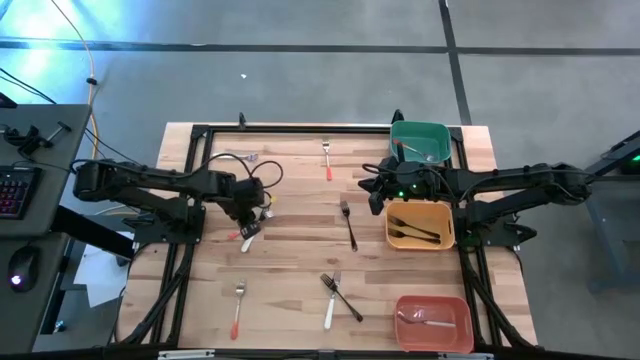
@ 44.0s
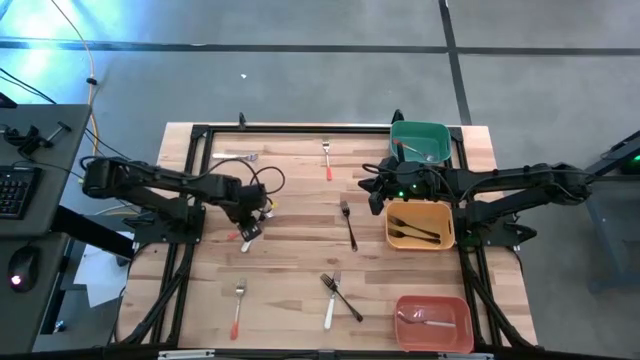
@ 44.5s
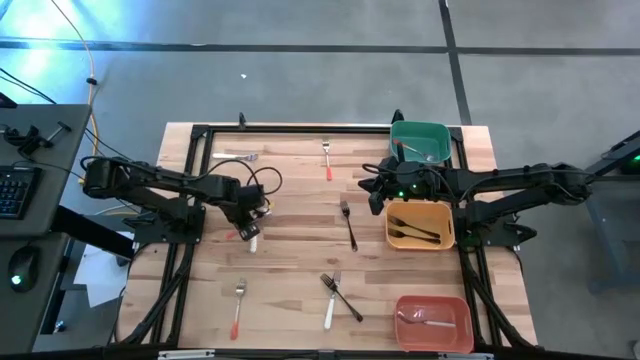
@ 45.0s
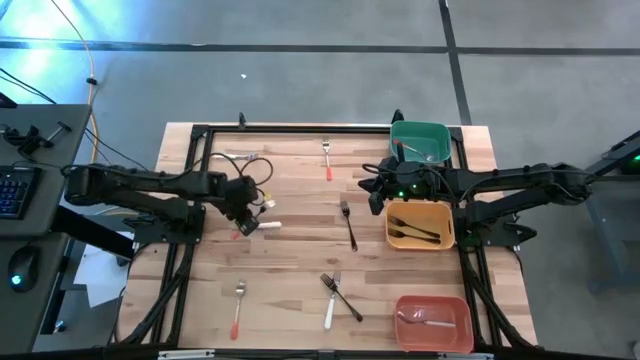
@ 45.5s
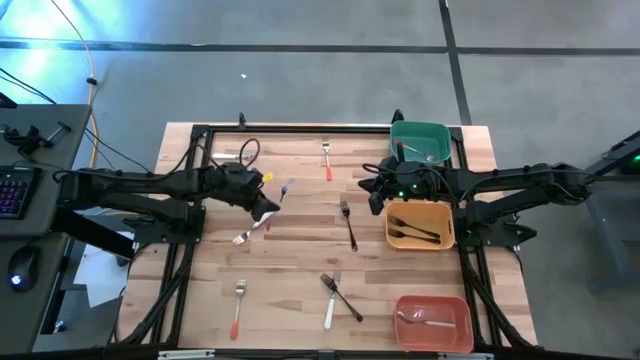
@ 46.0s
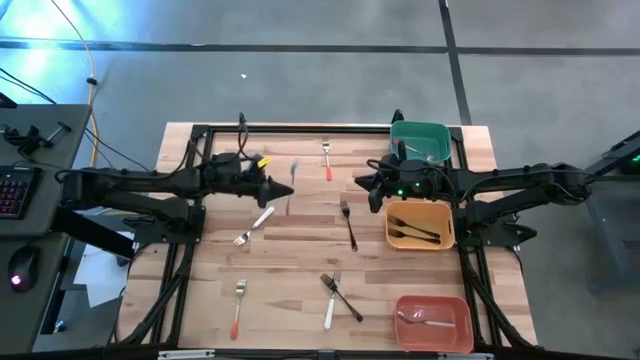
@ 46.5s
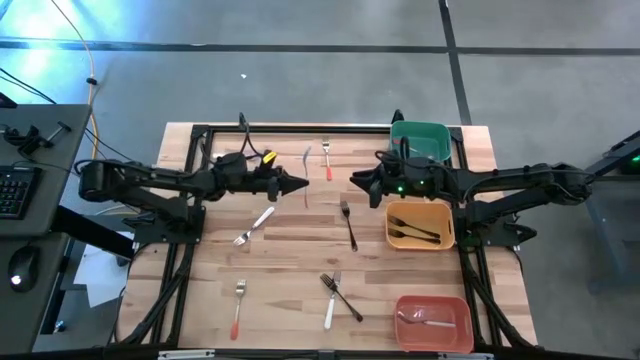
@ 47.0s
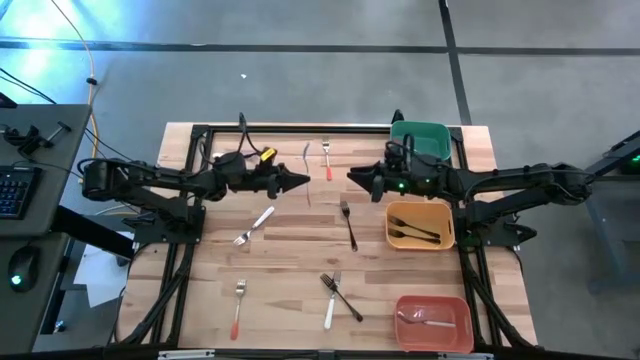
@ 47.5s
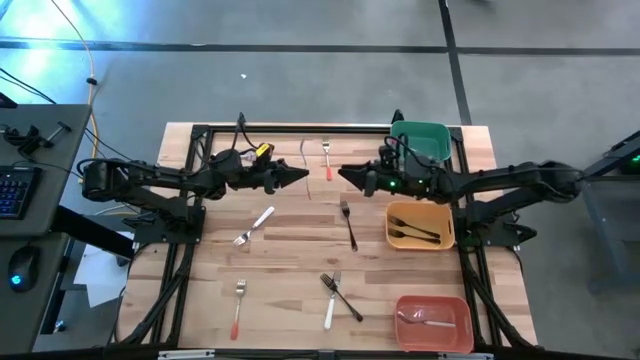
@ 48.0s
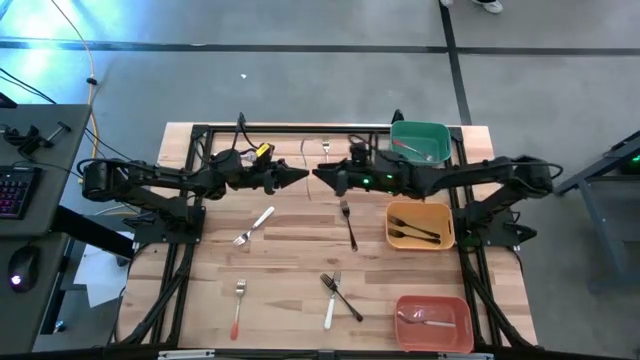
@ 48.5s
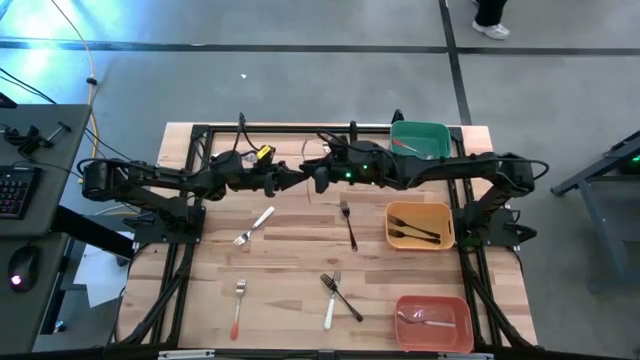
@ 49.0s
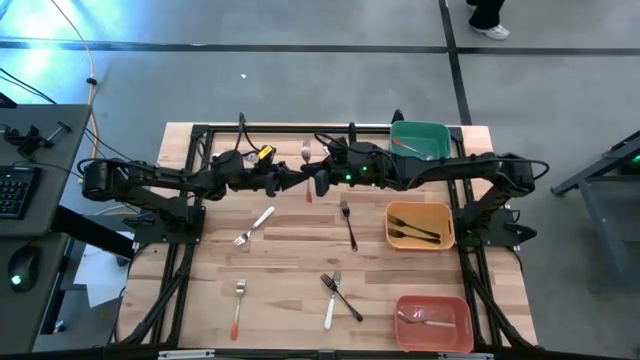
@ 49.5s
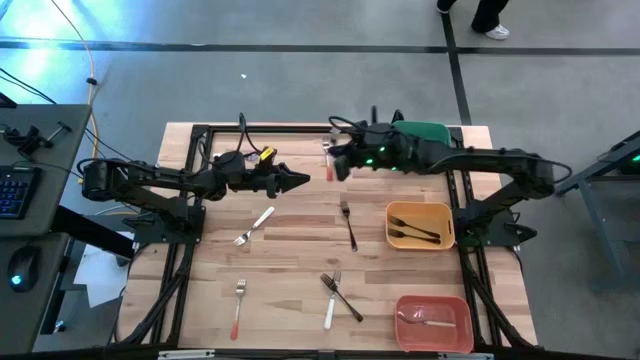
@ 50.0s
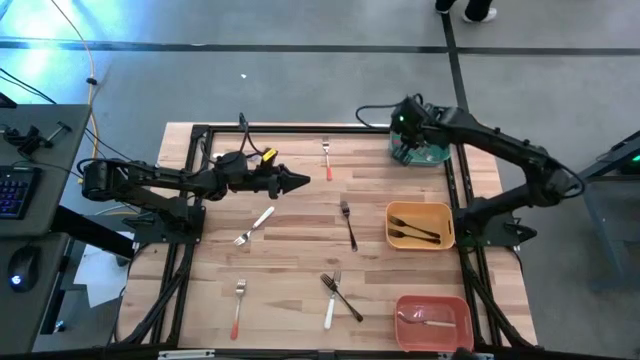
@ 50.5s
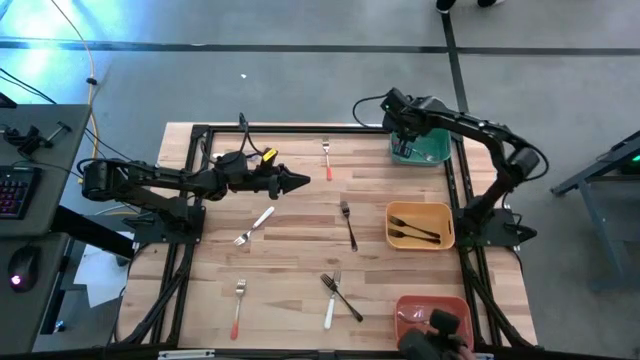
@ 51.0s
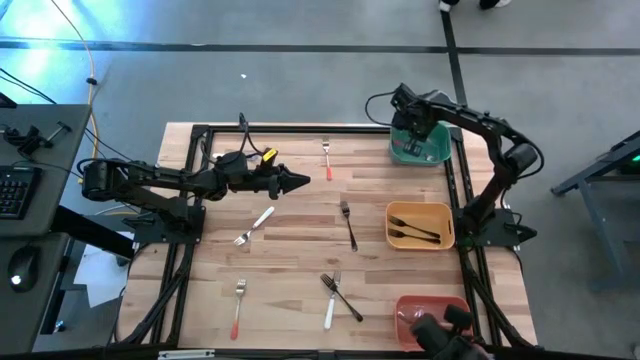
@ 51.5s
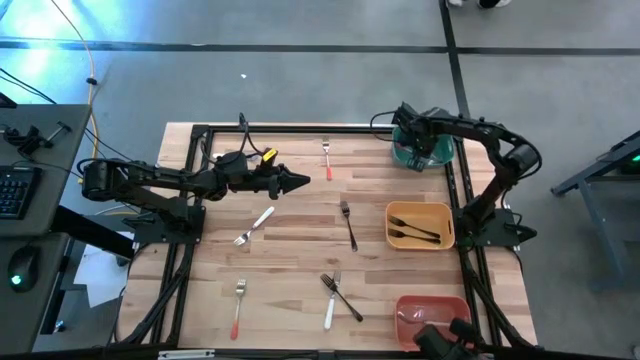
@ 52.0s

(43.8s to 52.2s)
Task: Sort silverware by color (type)
Put the orange fork into the green bin

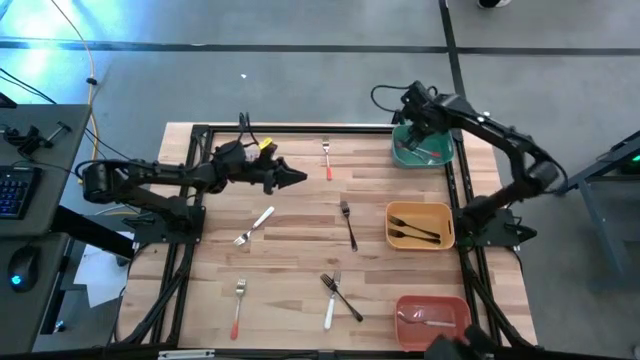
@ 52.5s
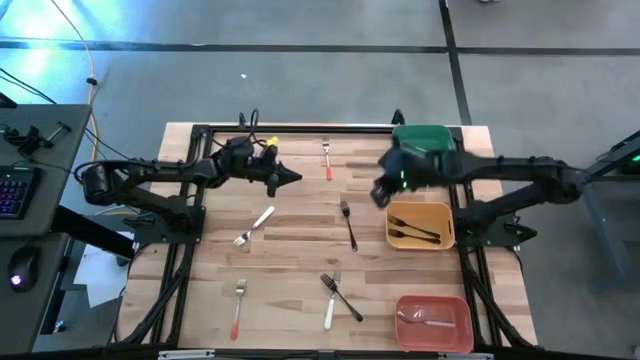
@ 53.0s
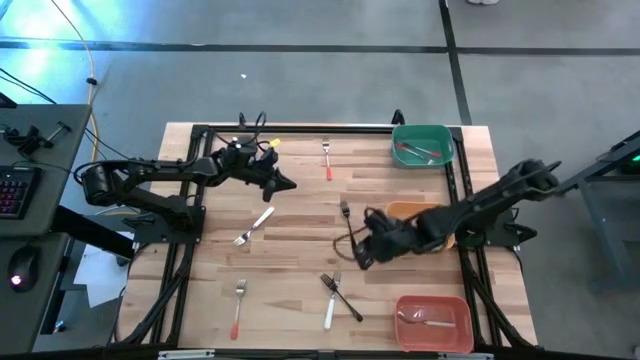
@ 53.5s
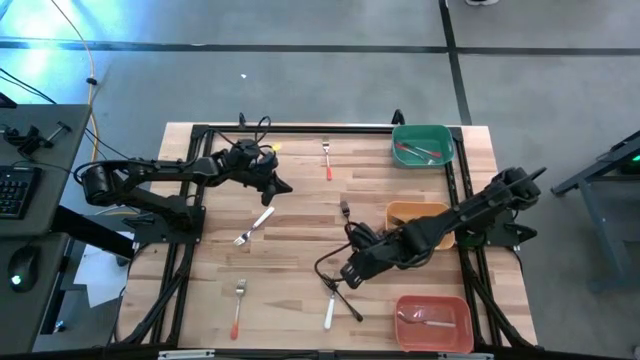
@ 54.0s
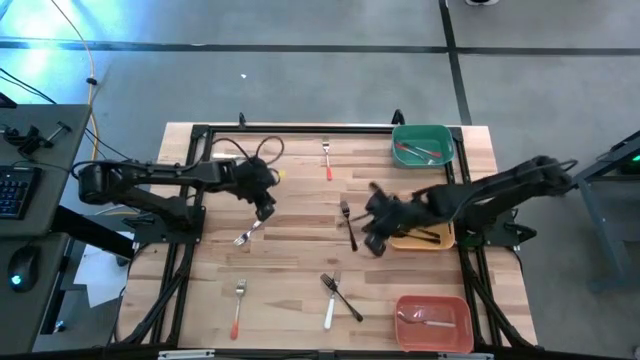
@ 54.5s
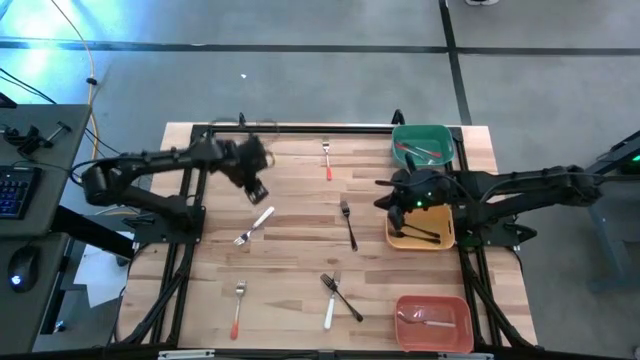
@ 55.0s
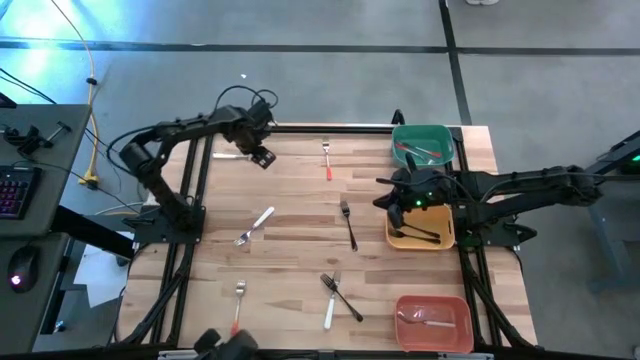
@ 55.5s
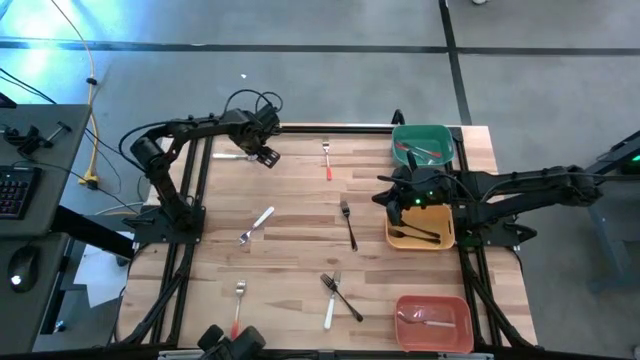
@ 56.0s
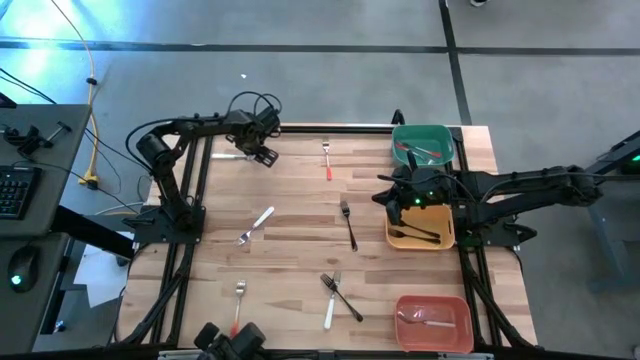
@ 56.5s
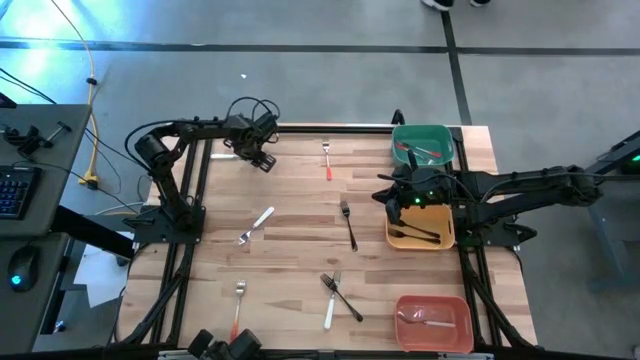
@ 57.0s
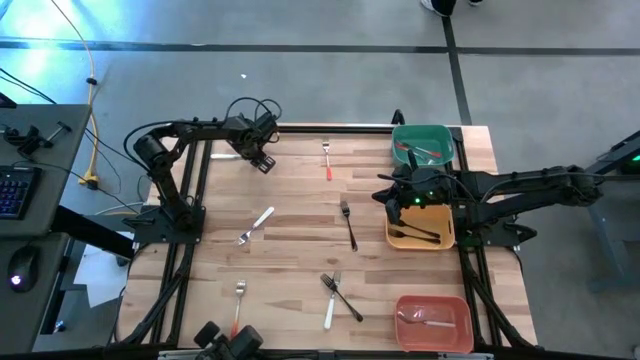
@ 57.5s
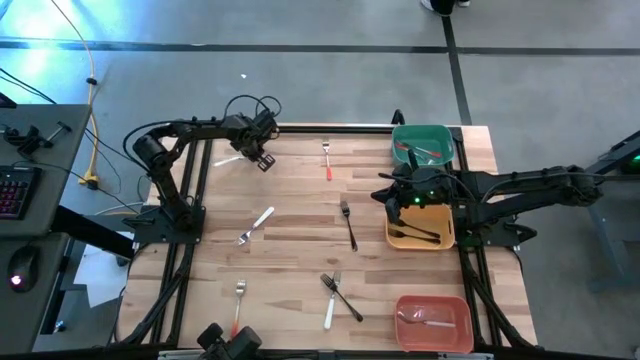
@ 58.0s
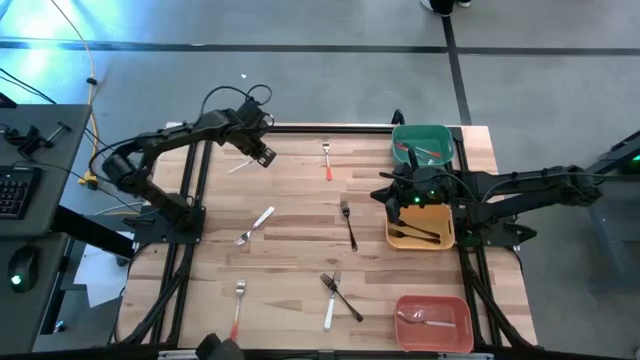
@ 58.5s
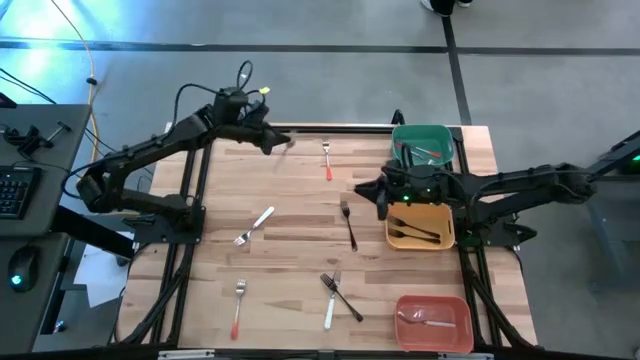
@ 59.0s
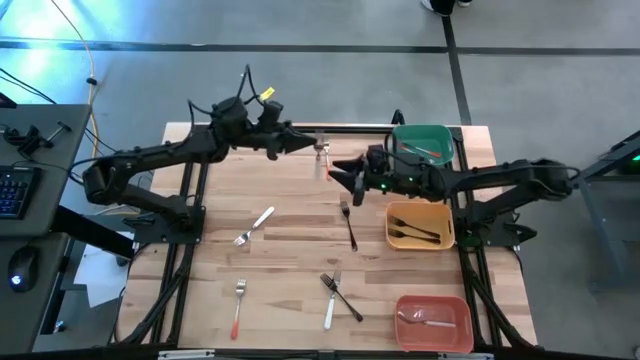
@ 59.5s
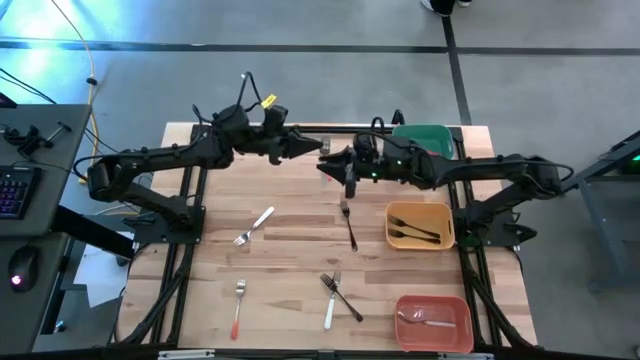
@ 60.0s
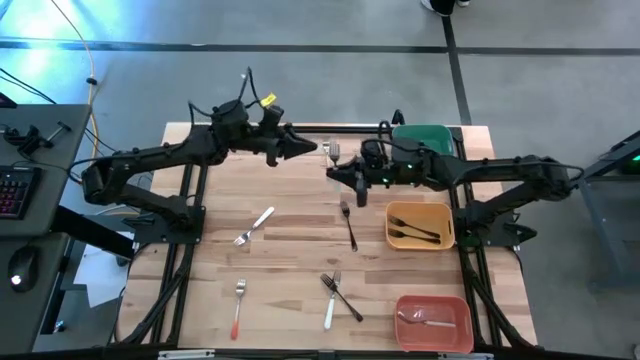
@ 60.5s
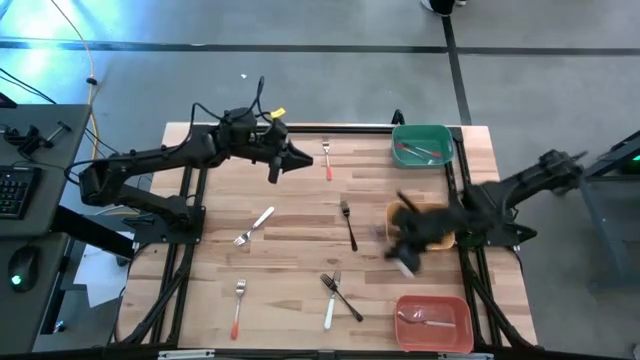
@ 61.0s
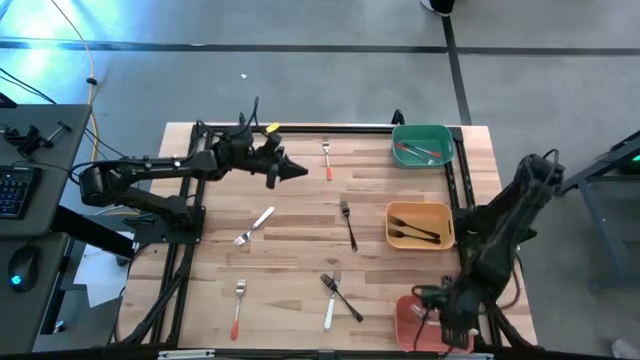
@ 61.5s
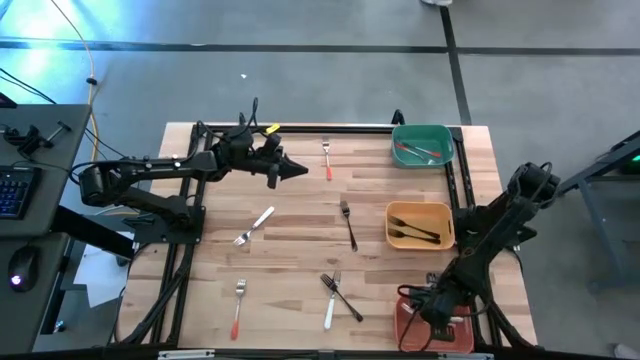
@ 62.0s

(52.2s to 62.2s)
Put the white fork into the orange bin

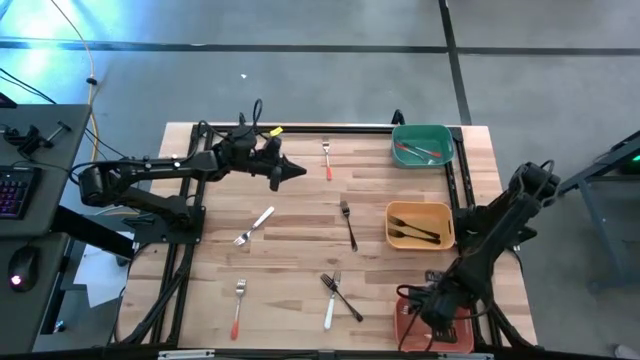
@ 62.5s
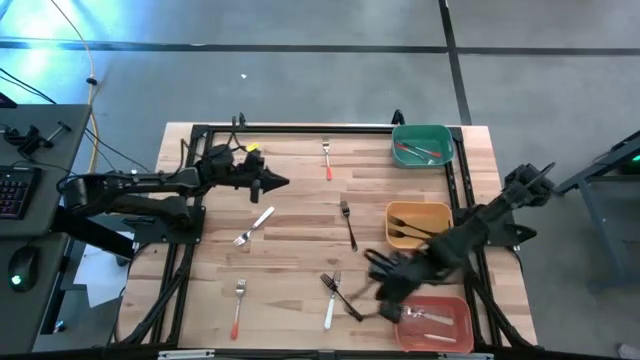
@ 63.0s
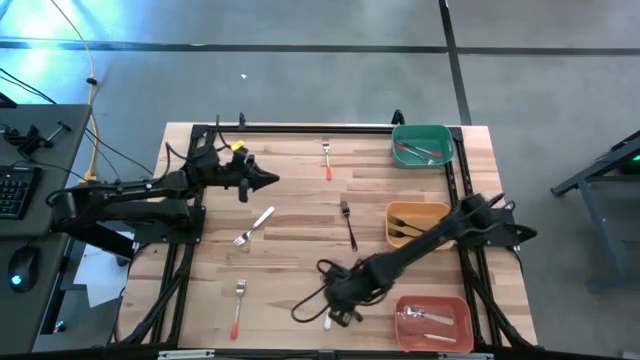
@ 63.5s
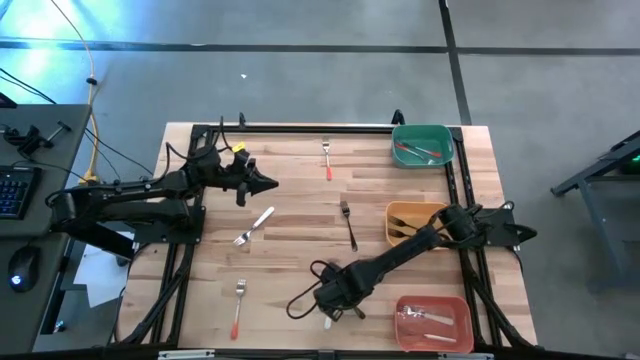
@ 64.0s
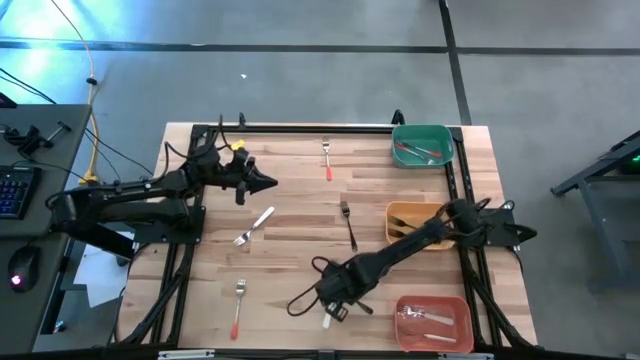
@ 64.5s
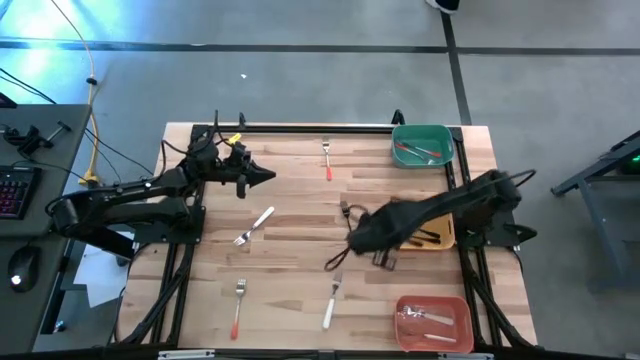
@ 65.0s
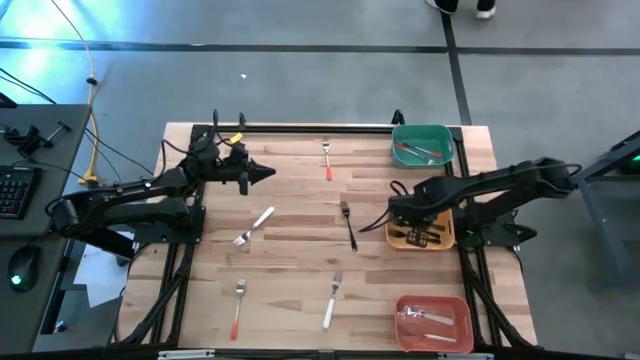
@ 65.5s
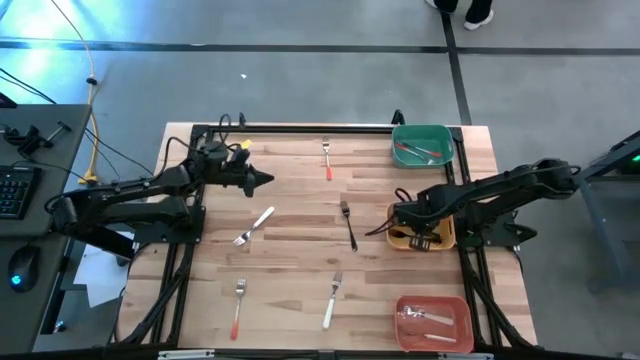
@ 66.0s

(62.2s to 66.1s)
Put the black fork into the yellow bin

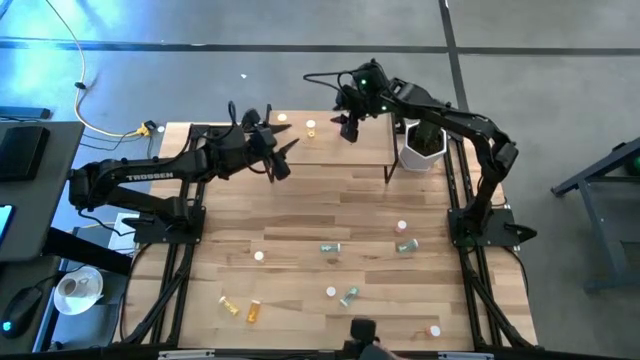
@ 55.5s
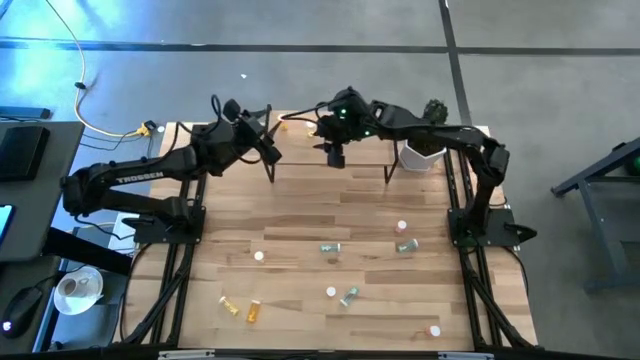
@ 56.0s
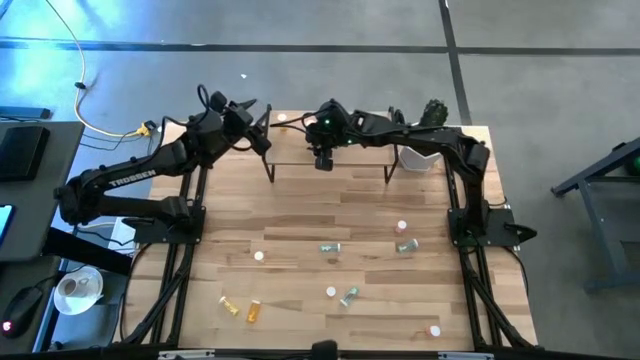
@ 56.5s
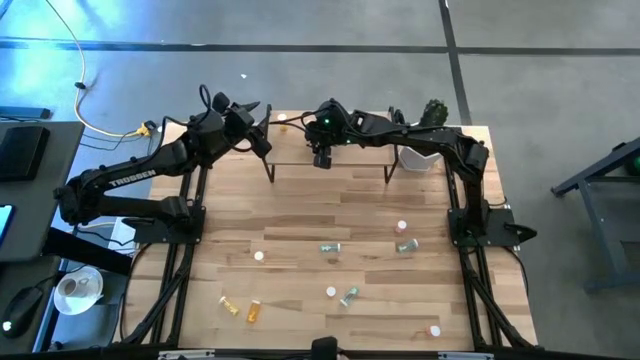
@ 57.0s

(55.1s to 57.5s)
Task: Pick and place medicine bottles onto shelf by color
Adjust the yellow pill bottle on the shelf
